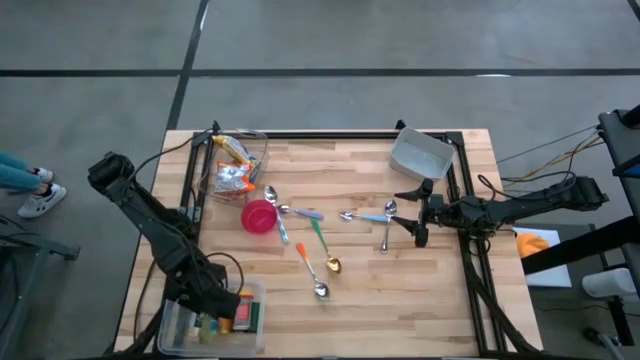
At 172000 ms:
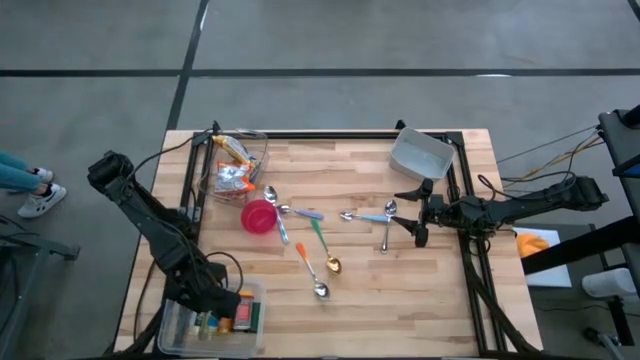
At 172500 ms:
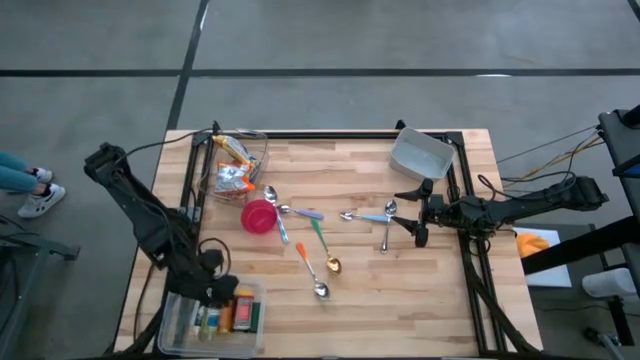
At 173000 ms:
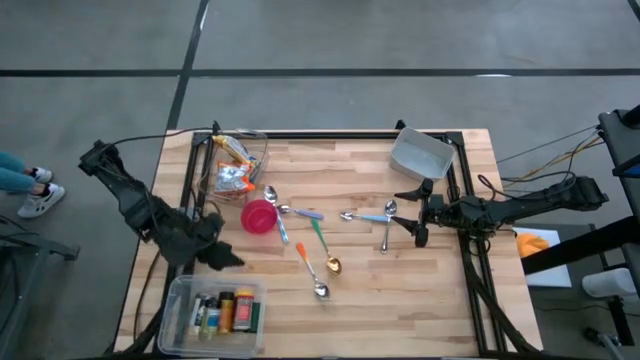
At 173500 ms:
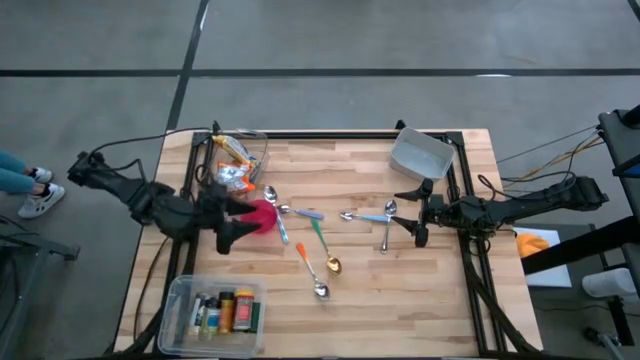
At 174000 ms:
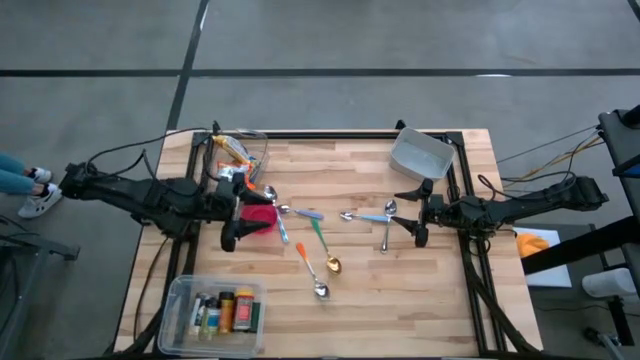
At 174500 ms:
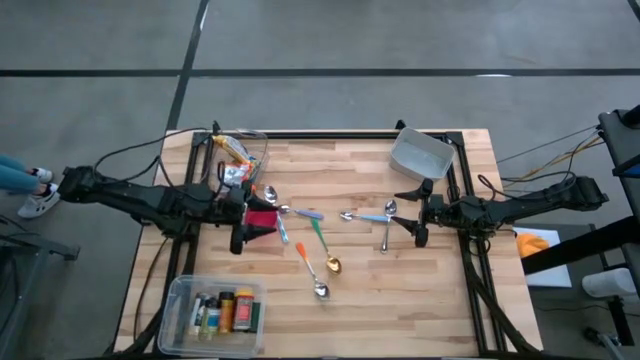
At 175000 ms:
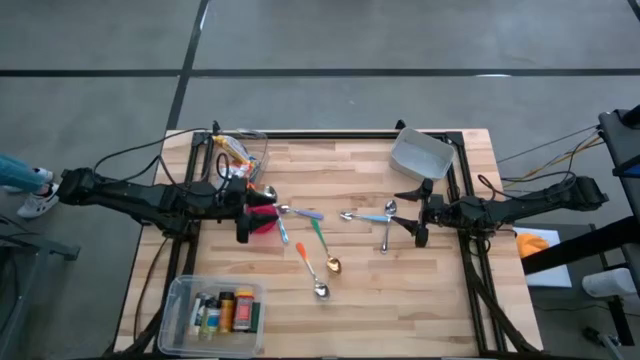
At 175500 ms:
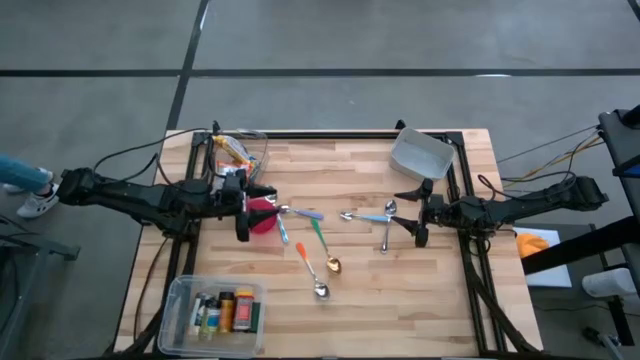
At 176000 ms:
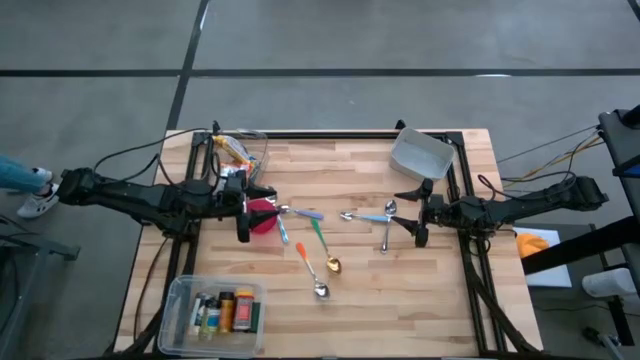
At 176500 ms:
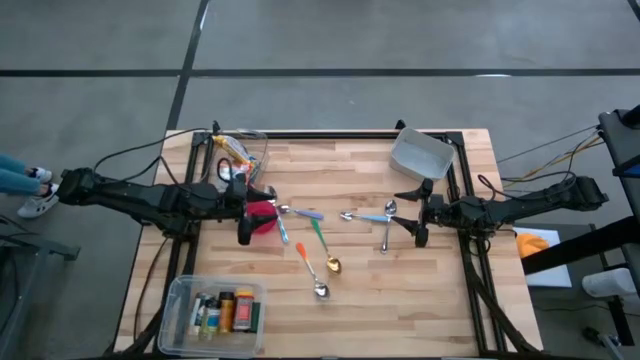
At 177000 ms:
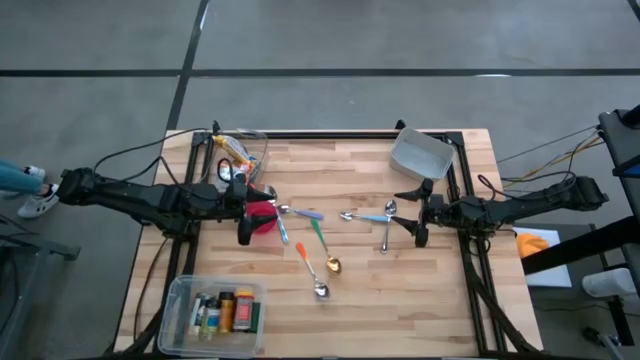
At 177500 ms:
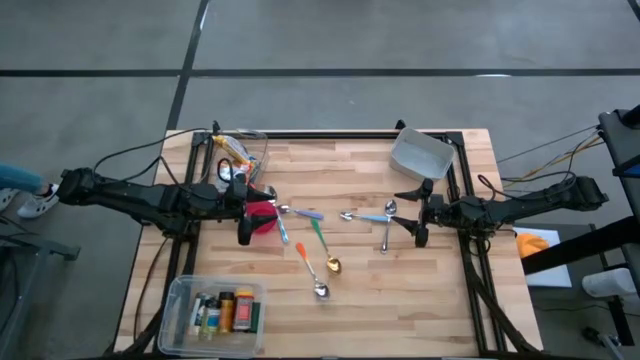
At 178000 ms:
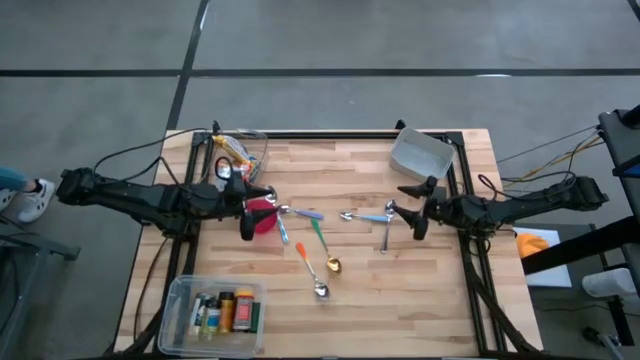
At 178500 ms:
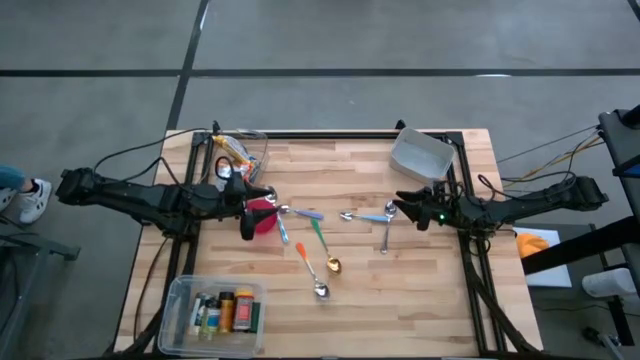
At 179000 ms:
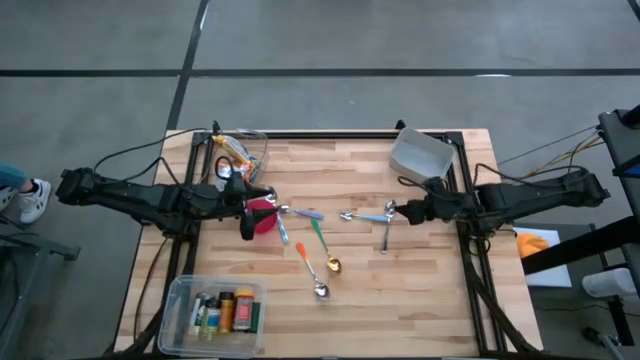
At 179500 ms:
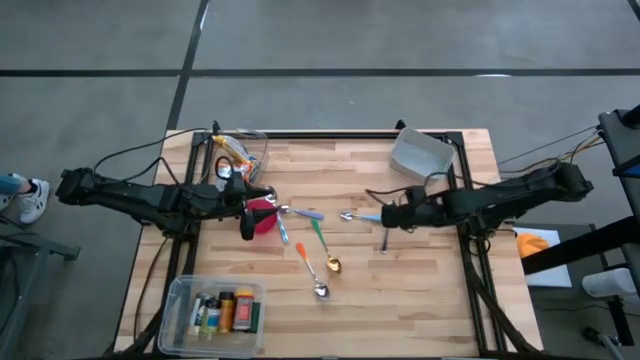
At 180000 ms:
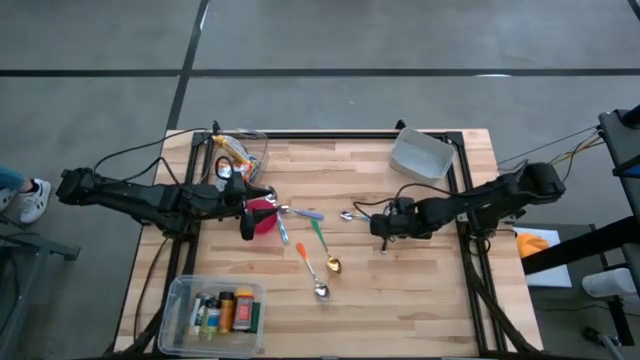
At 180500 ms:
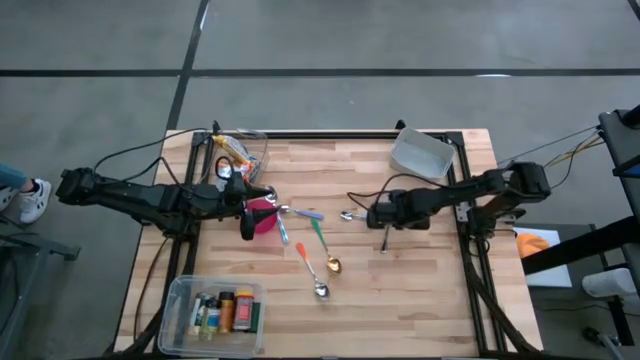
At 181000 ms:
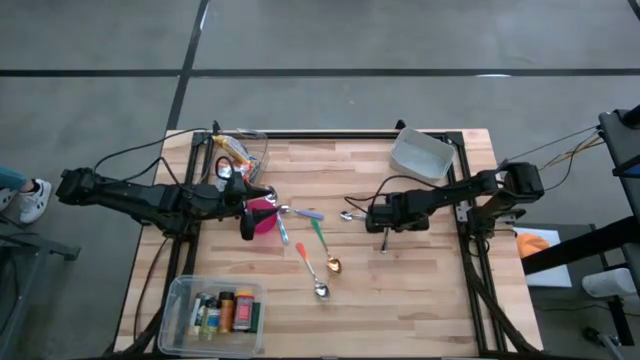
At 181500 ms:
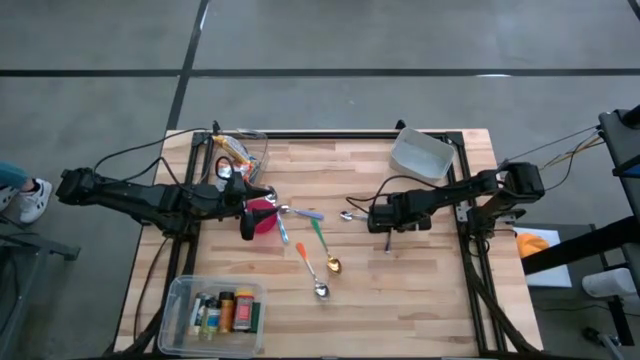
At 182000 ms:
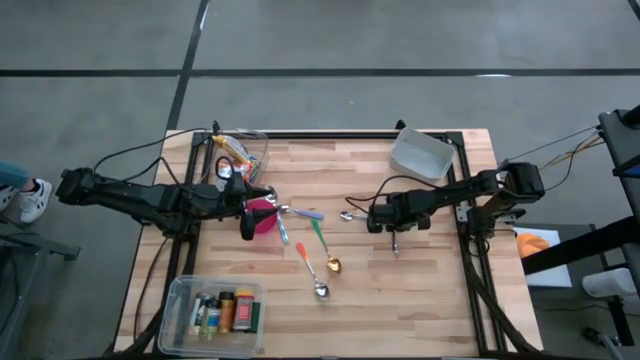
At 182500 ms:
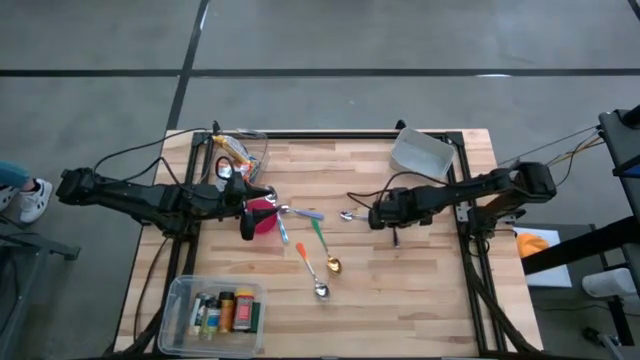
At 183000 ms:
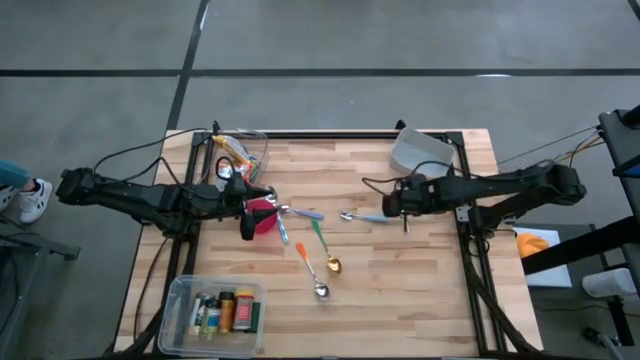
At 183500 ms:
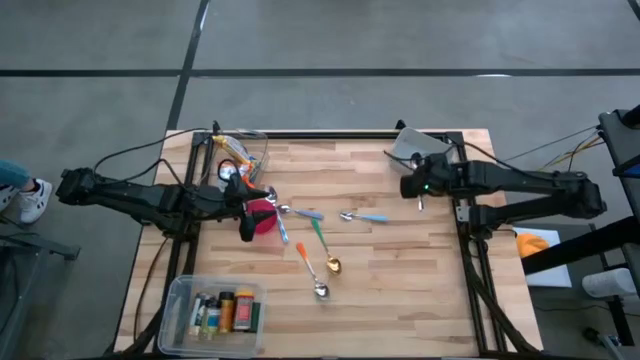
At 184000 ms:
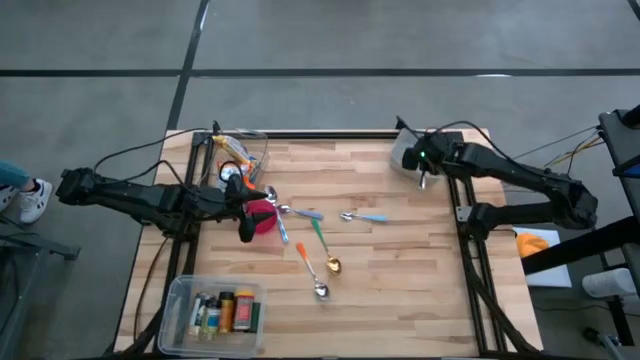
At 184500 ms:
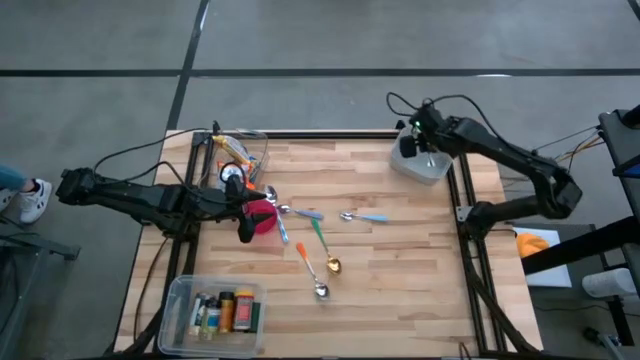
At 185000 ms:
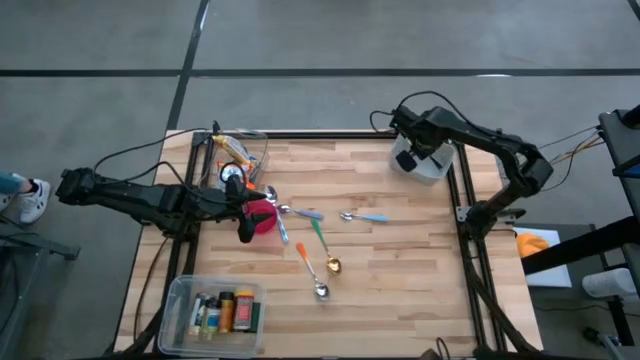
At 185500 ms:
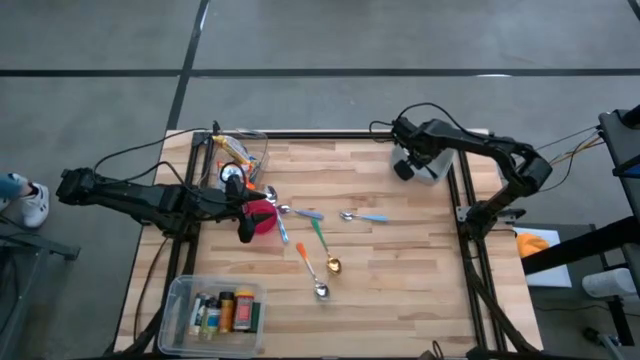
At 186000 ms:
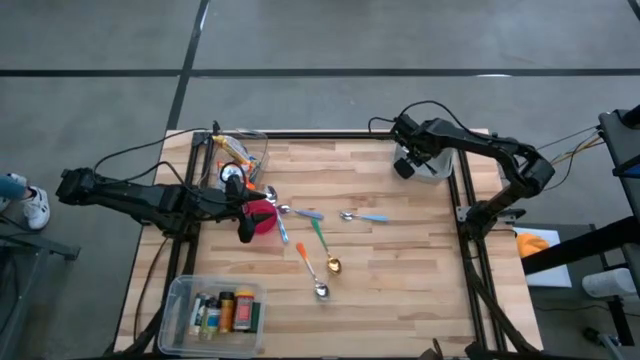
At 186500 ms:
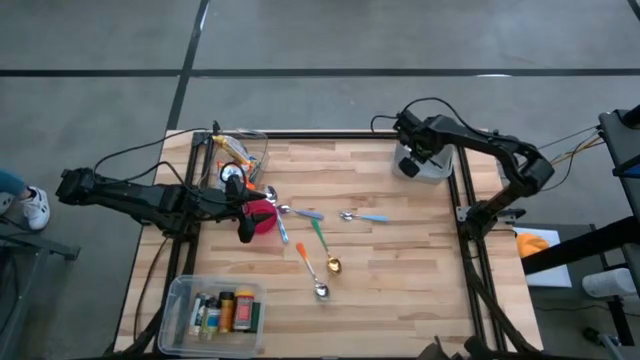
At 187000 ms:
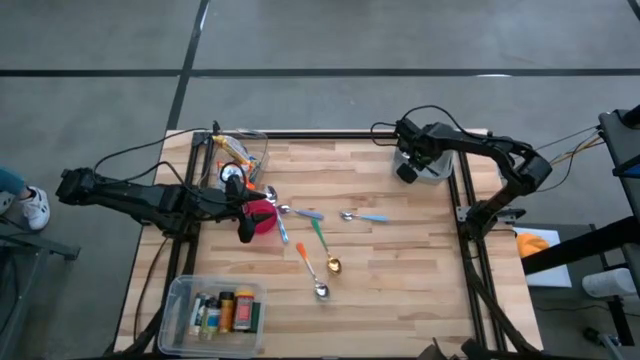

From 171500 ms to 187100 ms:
Put the silver spoon into the gray bin

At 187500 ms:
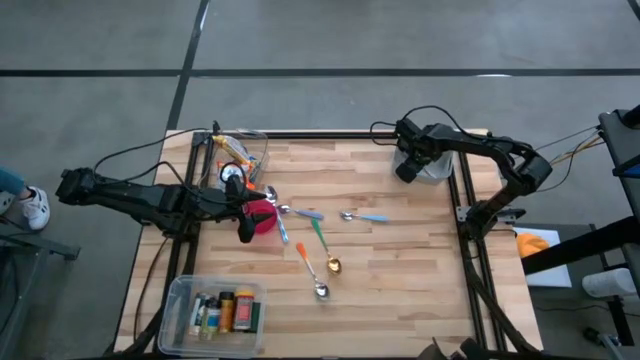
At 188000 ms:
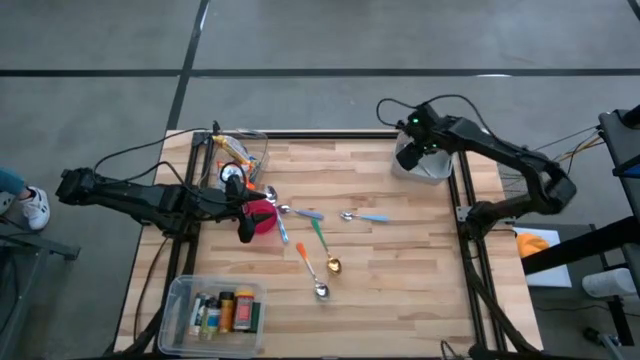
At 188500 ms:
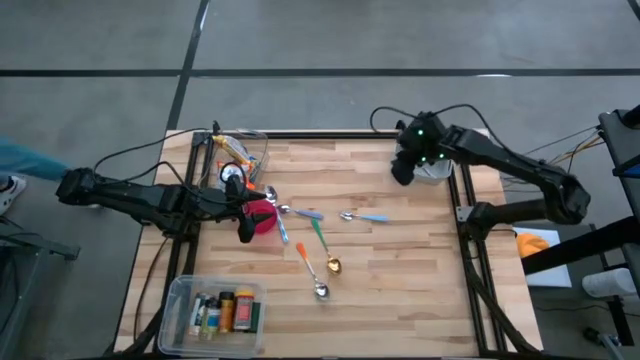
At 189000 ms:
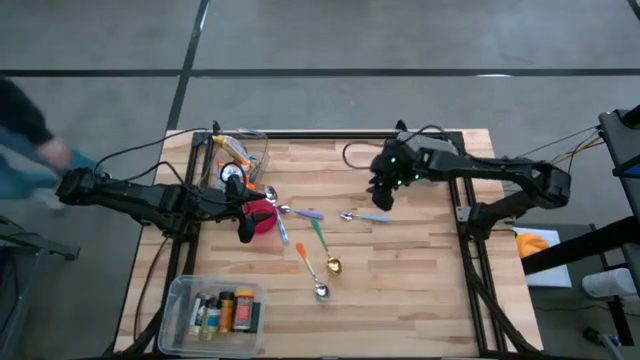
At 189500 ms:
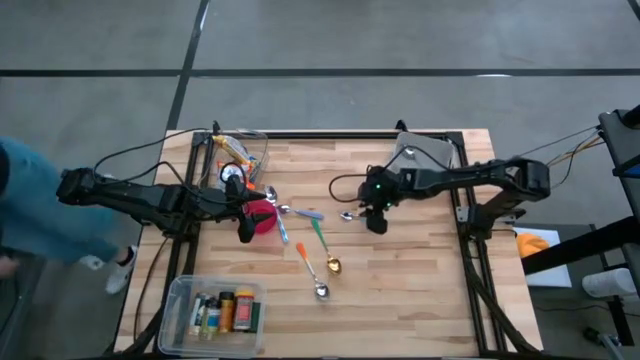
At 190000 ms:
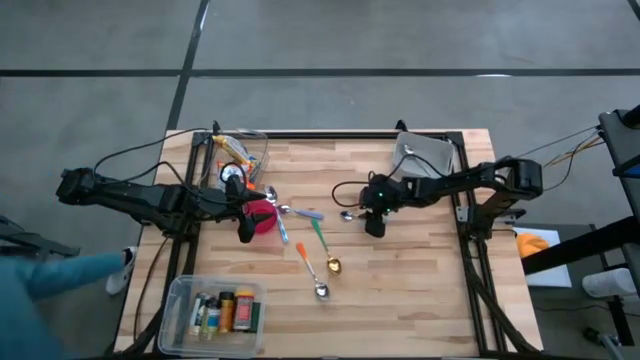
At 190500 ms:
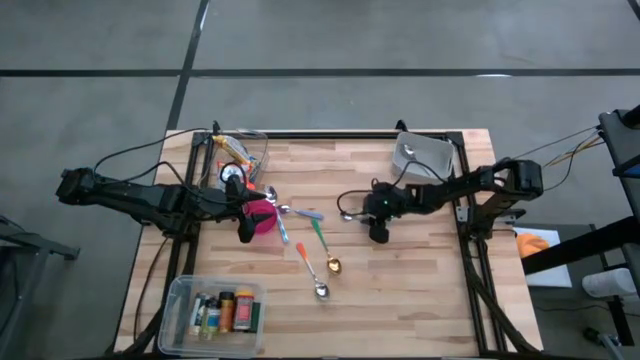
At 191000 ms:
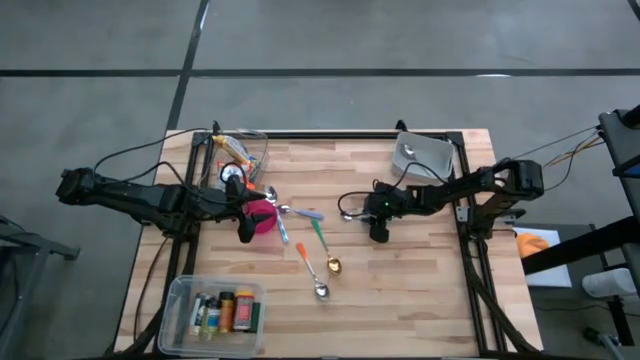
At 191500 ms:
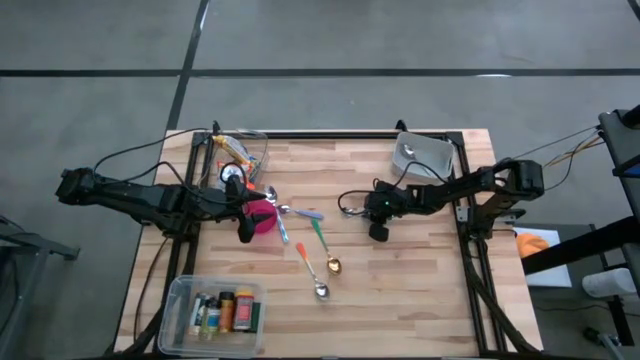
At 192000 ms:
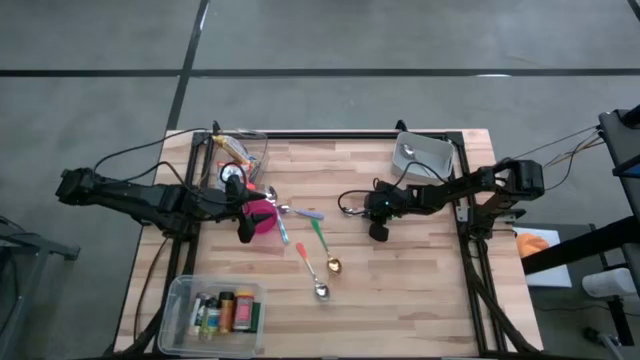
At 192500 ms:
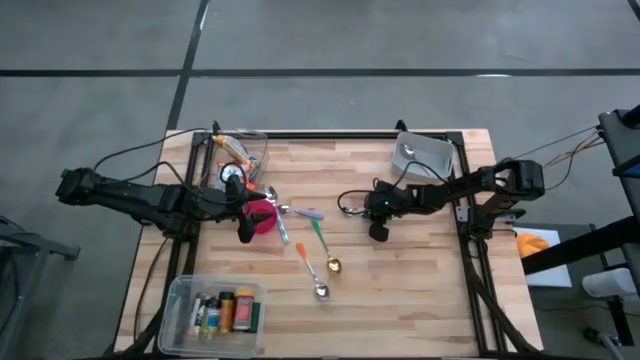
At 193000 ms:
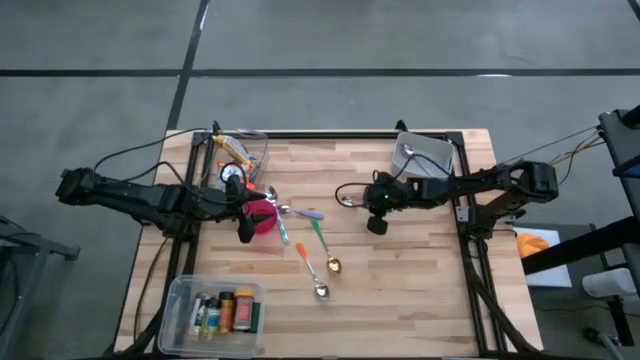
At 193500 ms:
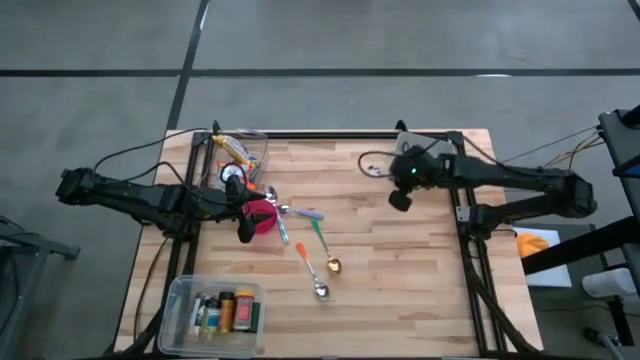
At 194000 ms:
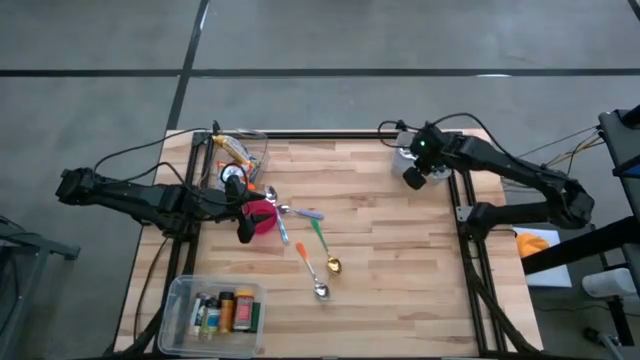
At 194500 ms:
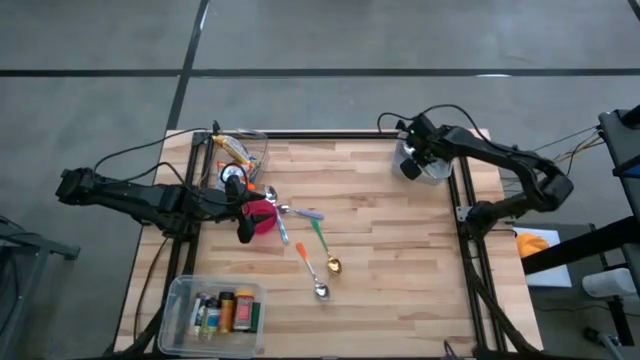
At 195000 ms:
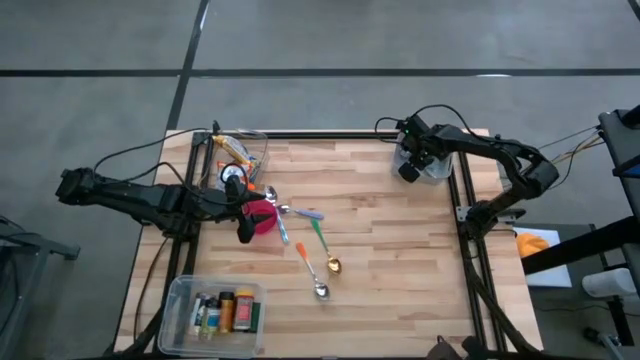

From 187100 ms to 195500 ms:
Put the blue spoon into the gray bin
